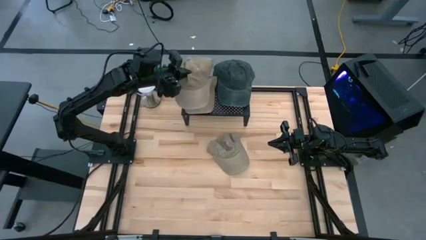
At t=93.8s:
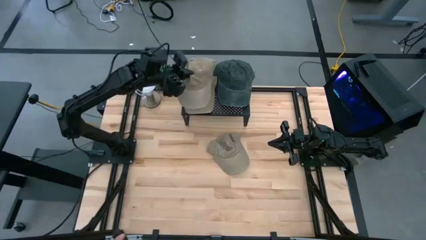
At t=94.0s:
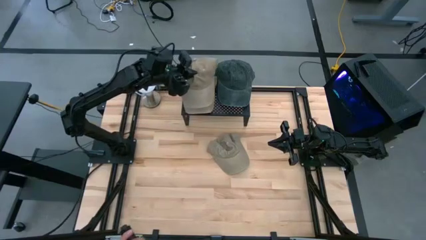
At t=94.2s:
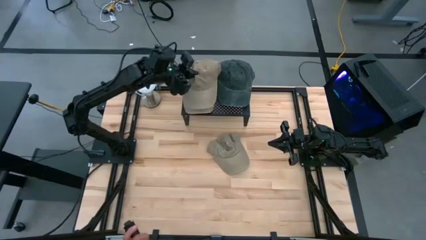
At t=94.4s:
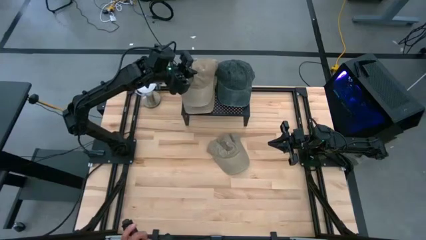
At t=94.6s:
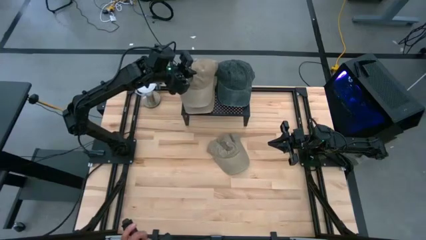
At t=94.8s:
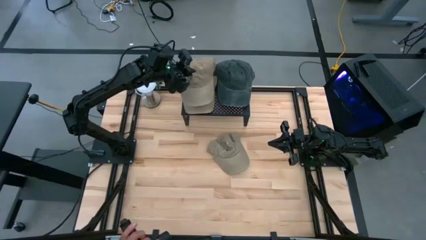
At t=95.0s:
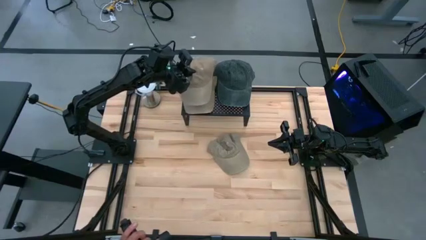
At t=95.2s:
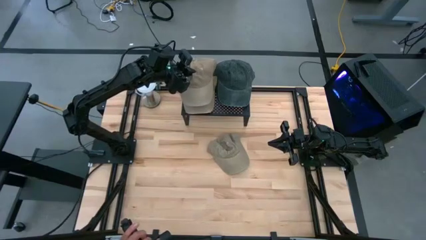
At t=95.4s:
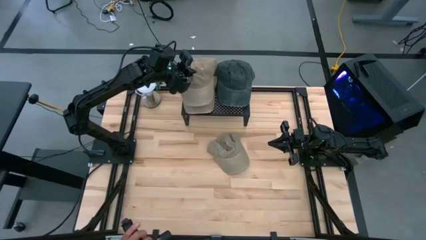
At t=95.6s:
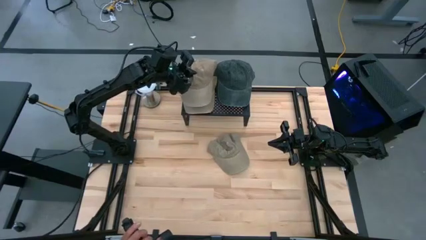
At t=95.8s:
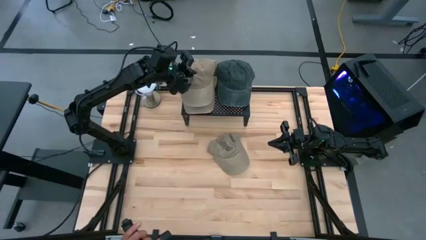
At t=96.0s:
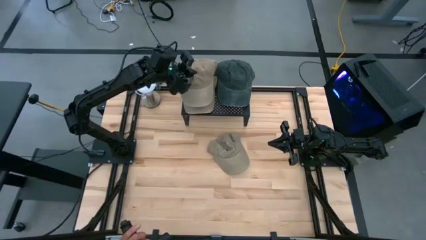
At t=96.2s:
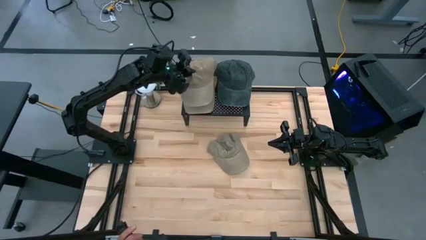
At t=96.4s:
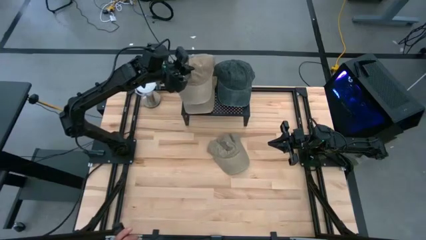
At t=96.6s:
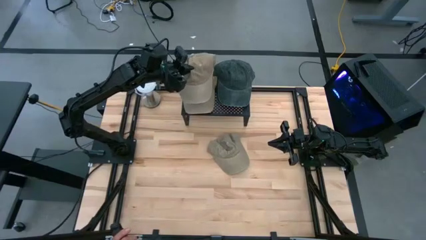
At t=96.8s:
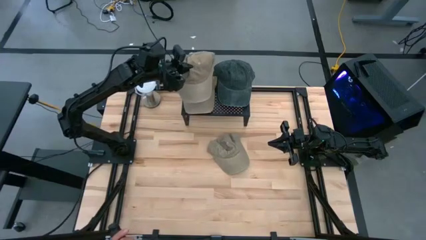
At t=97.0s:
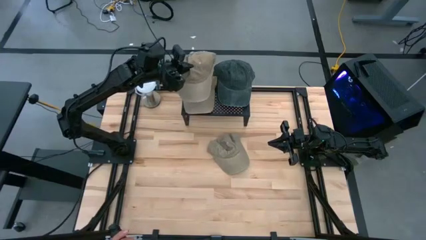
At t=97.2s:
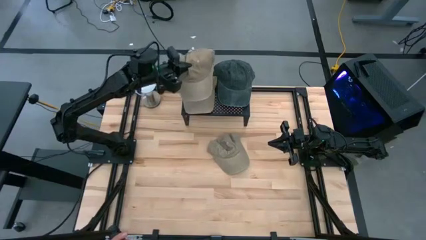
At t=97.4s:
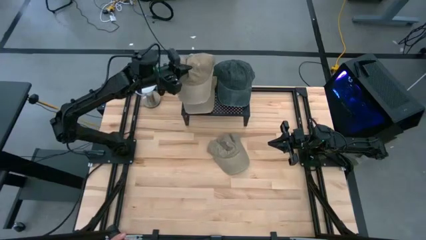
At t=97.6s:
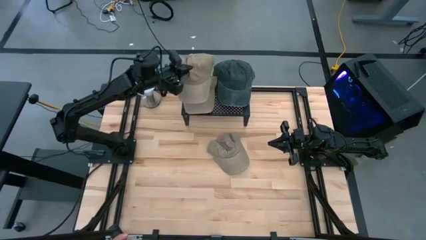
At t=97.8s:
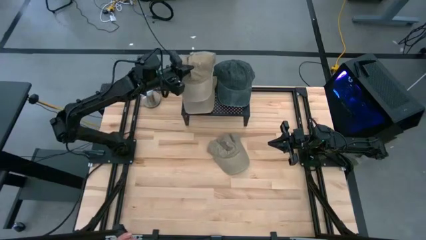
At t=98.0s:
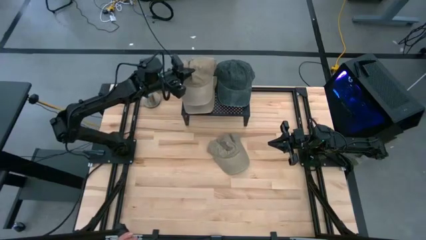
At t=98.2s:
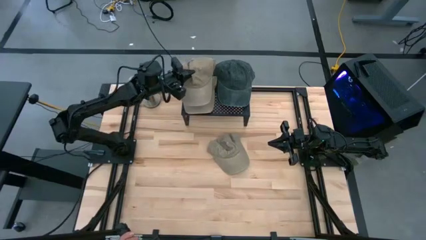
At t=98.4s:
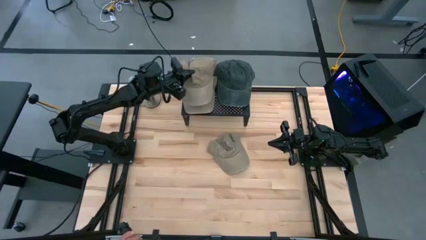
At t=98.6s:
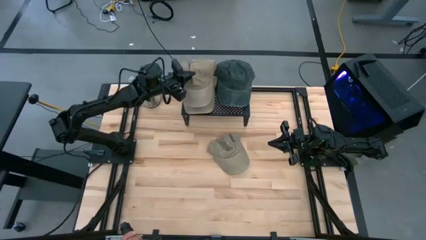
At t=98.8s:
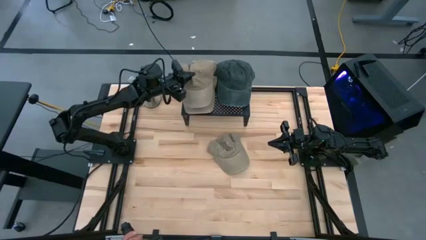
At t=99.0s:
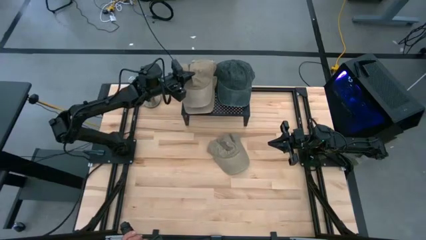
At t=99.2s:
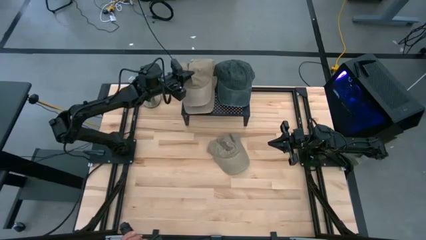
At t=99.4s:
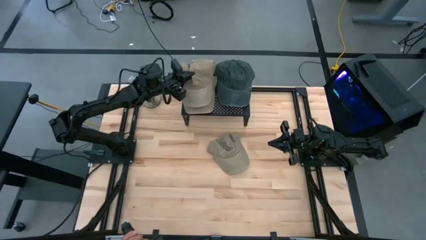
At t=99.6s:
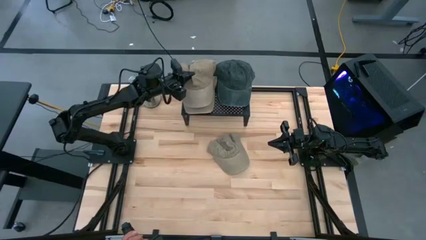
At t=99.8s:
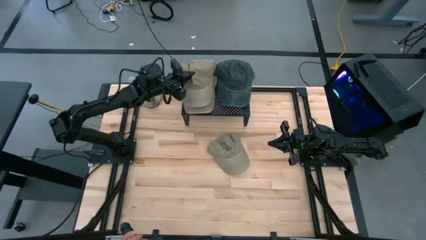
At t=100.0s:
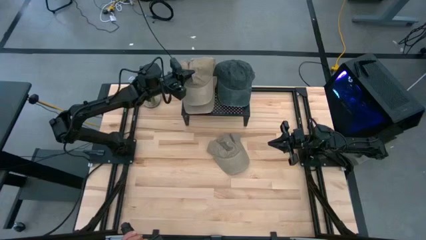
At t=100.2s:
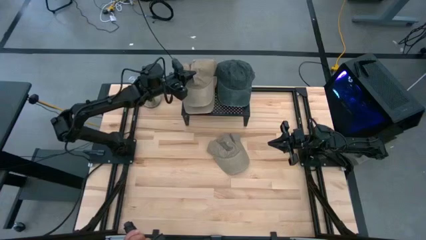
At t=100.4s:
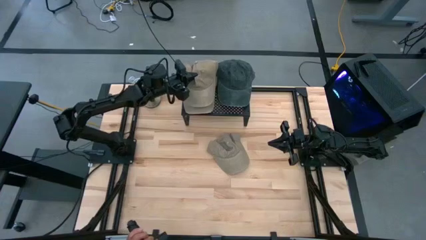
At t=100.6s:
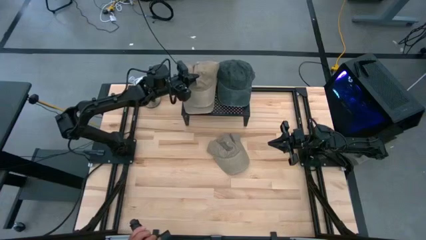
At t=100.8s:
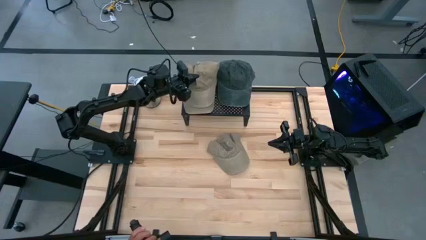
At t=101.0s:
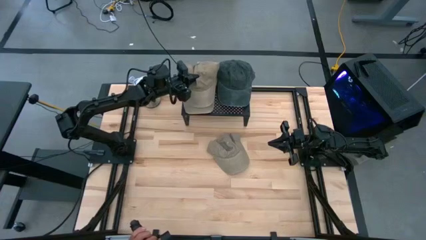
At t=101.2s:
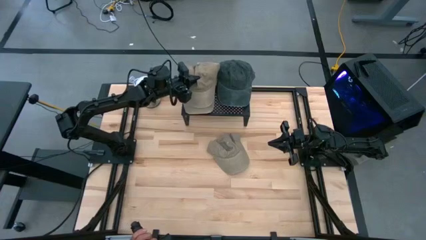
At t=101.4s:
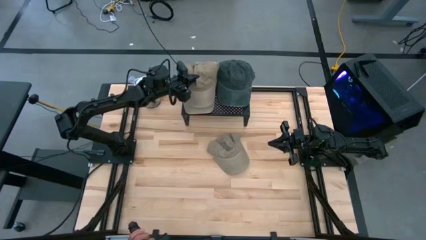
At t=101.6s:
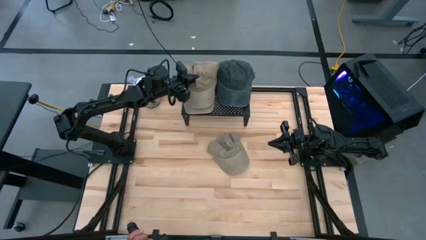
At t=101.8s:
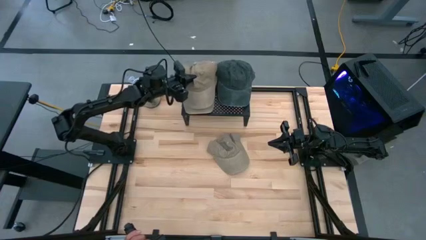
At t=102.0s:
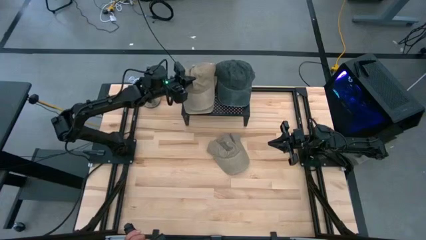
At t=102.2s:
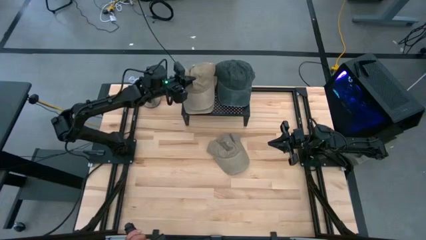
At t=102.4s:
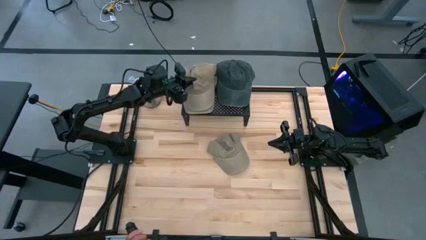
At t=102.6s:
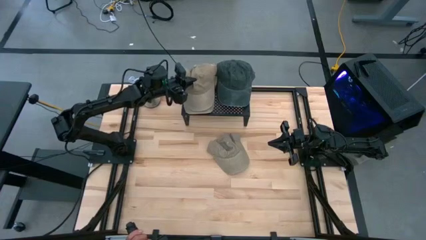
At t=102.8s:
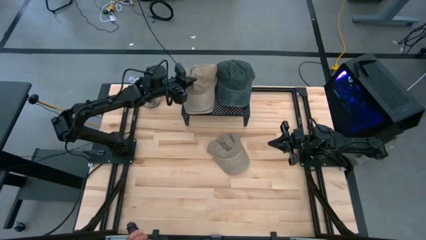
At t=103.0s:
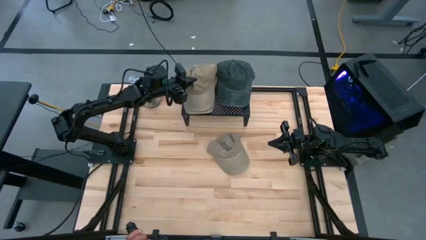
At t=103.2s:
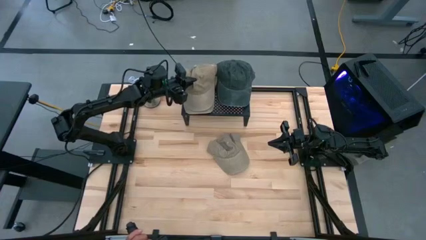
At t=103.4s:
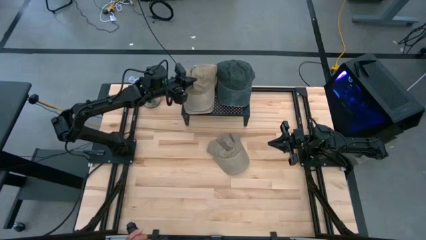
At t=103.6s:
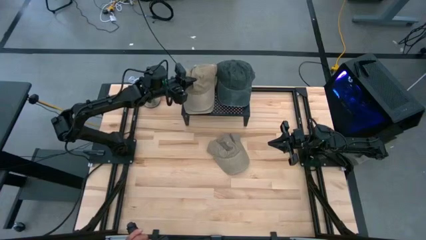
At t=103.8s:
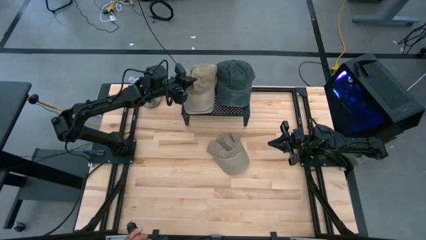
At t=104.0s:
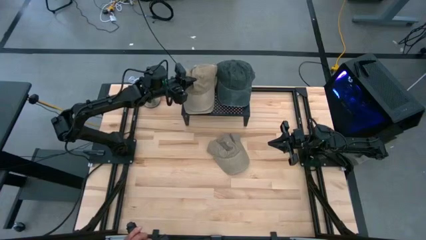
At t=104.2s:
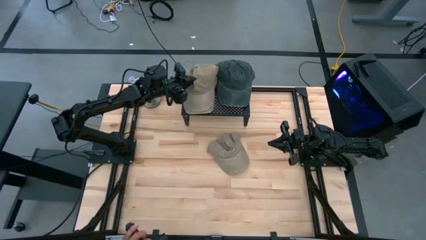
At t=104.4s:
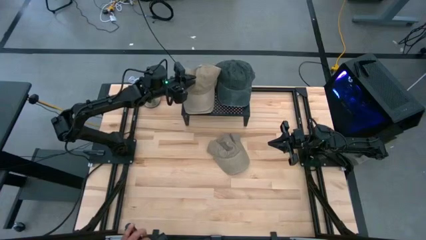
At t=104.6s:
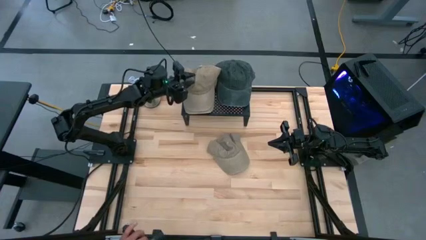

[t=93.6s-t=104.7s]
Task: Pick & Place hat
Stack the left brown cap on the other brown cap on the shelf

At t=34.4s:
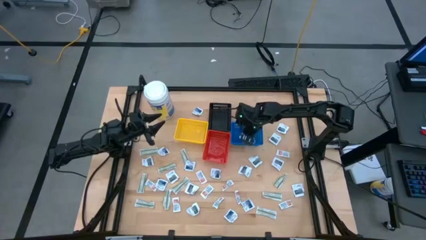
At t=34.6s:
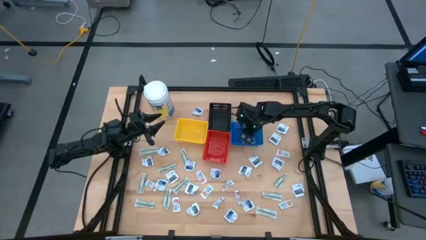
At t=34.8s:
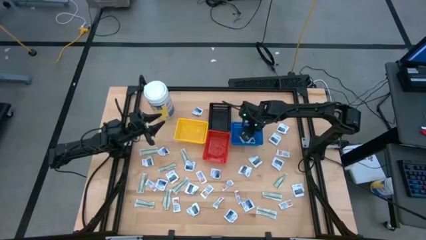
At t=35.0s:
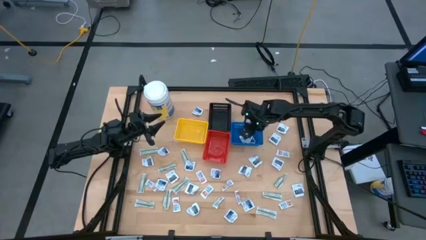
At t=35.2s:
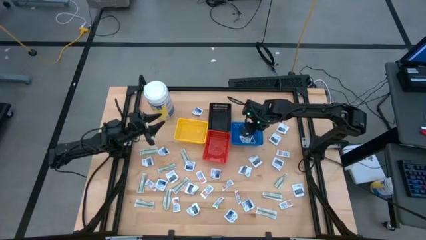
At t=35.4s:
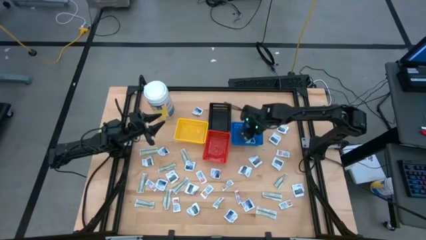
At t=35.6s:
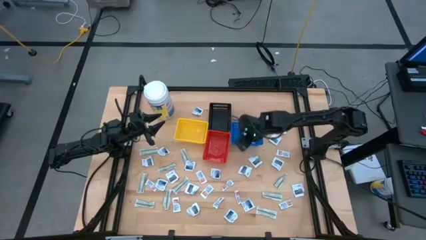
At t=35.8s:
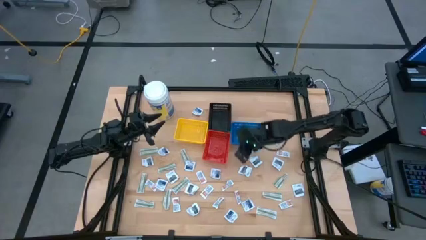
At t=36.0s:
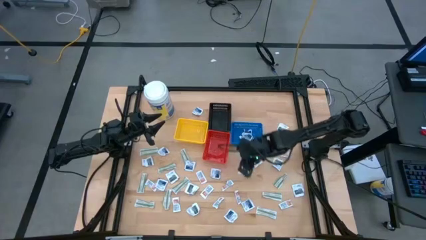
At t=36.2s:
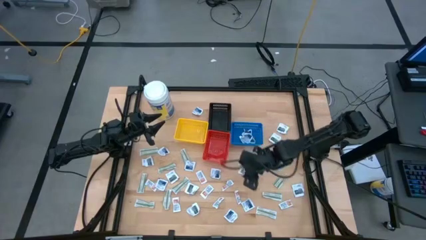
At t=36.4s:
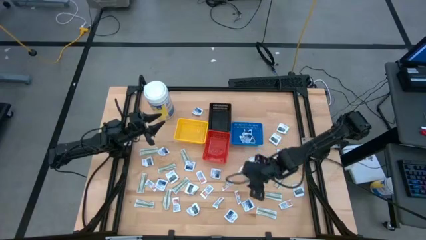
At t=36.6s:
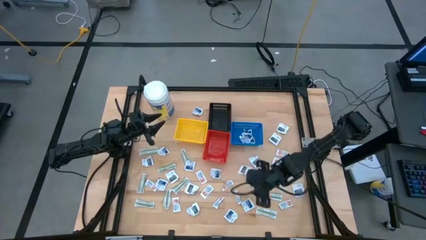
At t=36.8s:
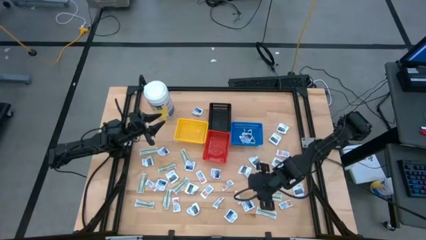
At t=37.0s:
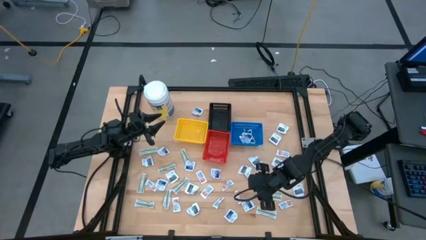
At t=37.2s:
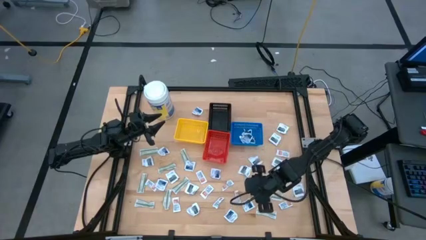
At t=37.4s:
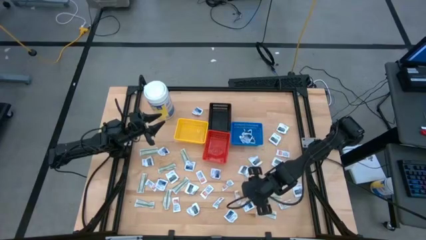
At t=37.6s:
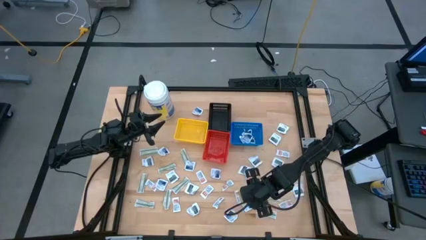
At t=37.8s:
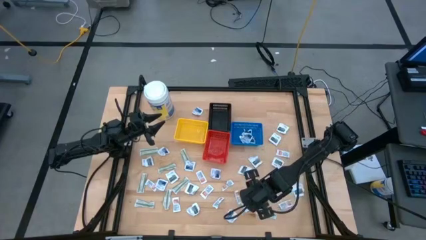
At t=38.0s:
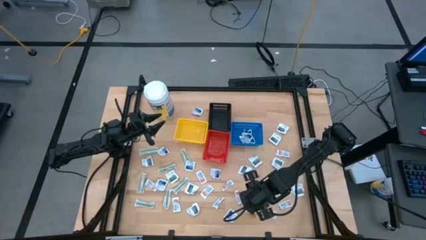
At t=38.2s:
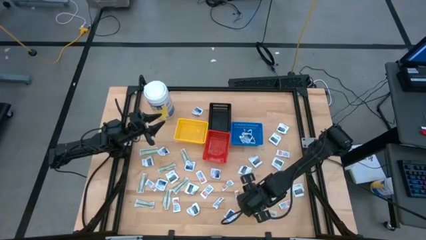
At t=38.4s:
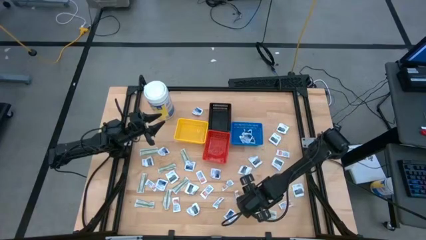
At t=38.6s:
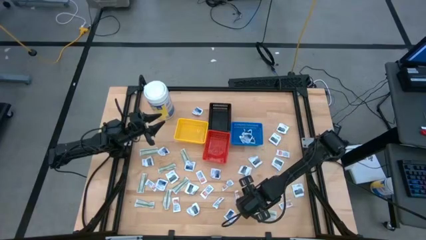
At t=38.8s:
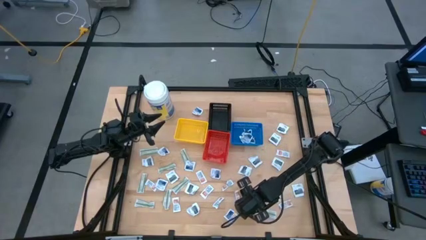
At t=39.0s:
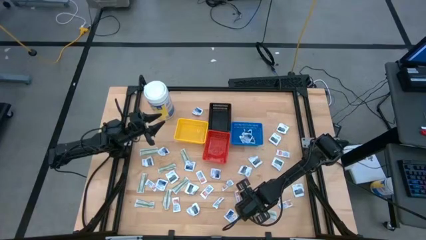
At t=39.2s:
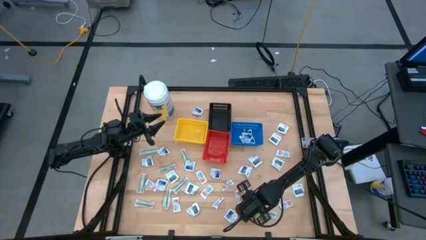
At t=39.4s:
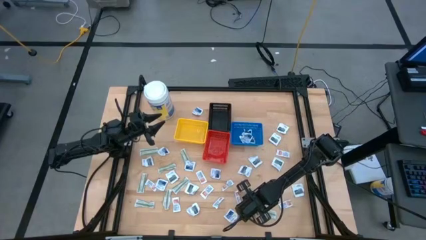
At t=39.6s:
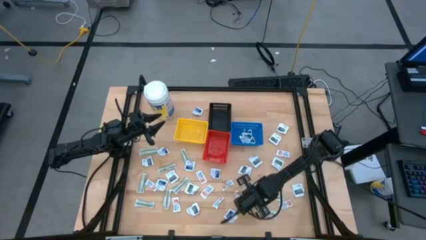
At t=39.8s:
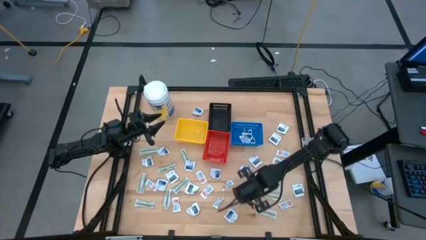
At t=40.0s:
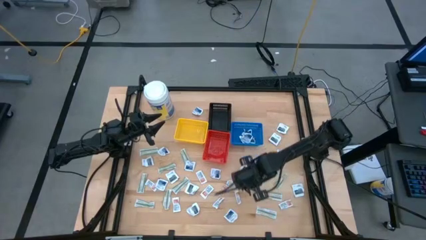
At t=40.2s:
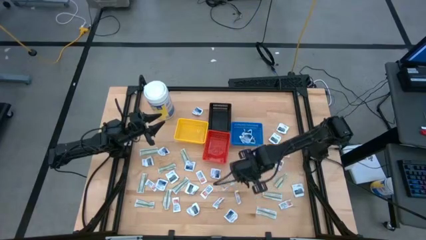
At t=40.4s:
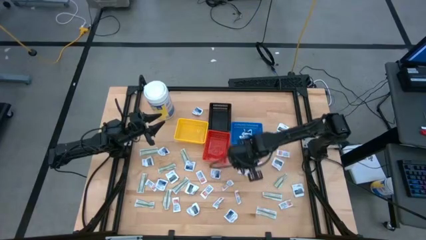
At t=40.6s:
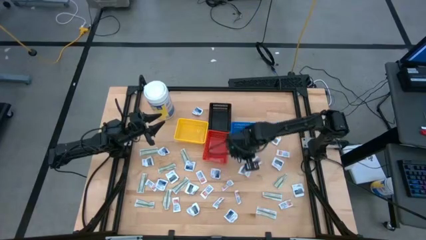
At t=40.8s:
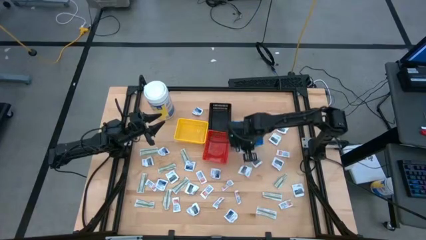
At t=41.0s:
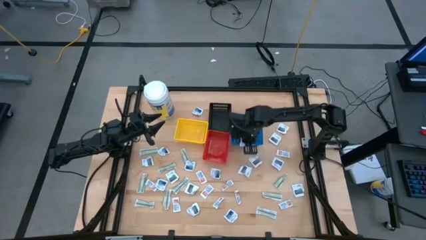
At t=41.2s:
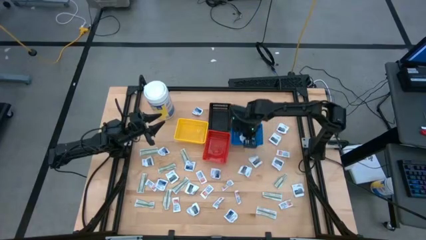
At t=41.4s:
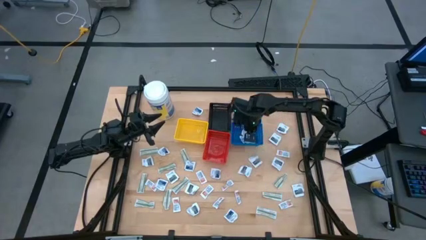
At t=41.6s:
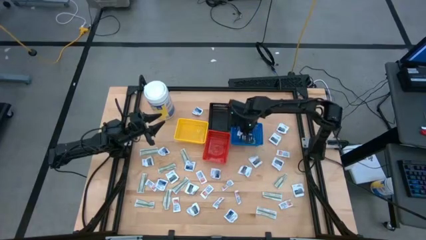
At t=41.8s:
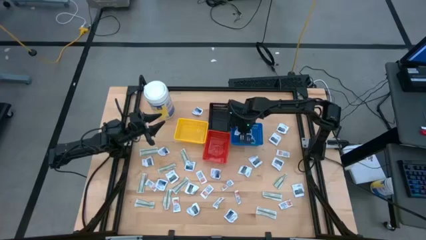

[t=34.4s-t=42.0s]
Task: Pick & Place First Aid Supplies
Put the alcohol pad into the blue bin
